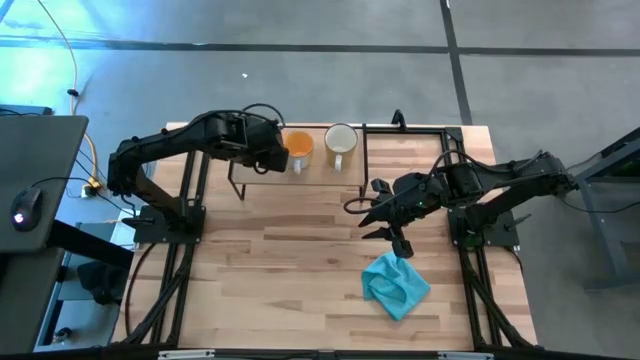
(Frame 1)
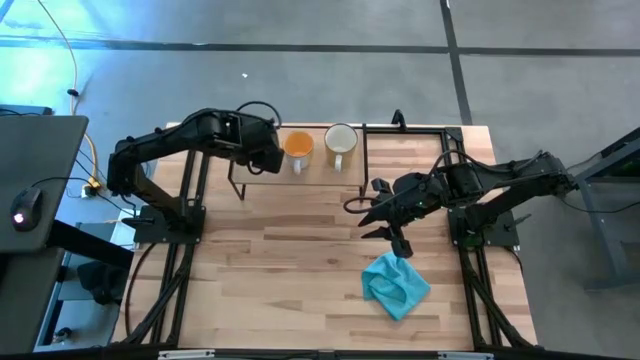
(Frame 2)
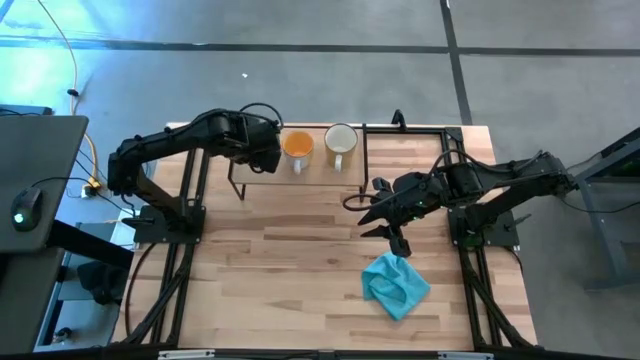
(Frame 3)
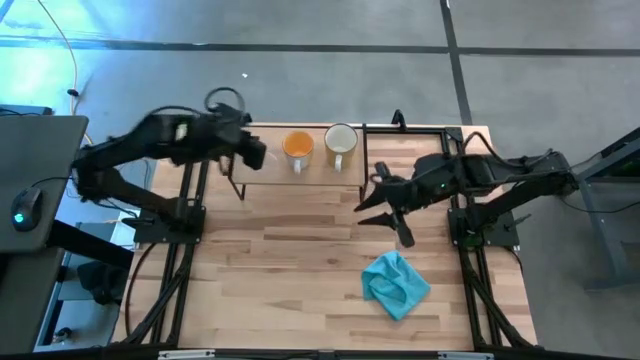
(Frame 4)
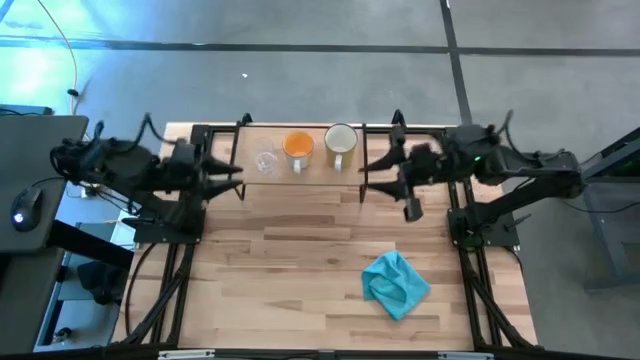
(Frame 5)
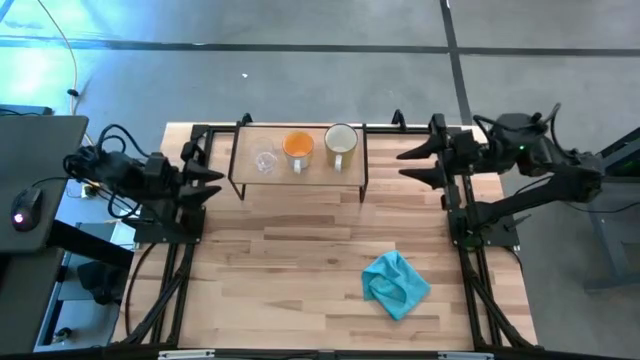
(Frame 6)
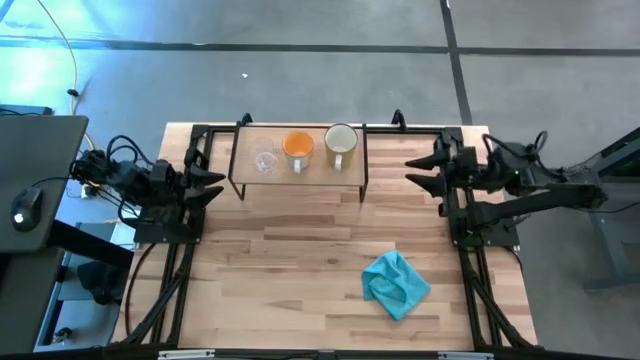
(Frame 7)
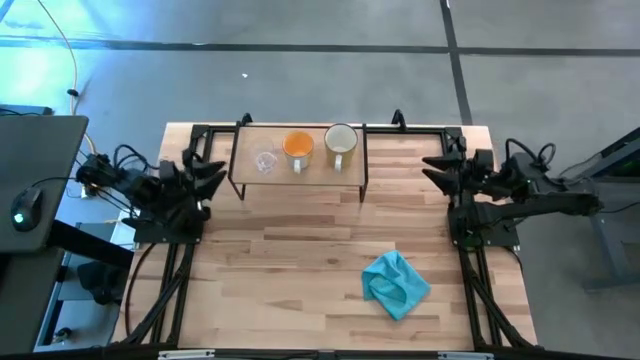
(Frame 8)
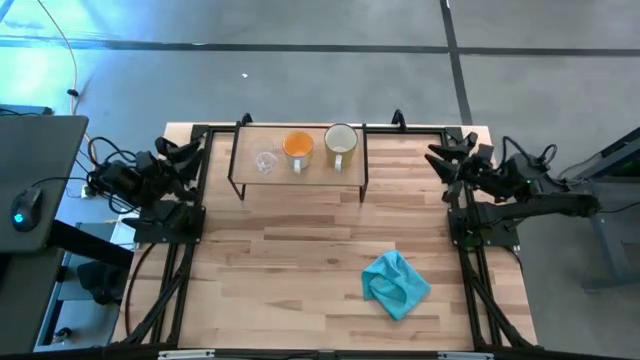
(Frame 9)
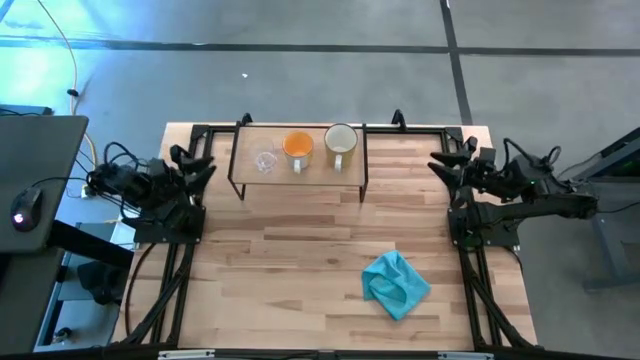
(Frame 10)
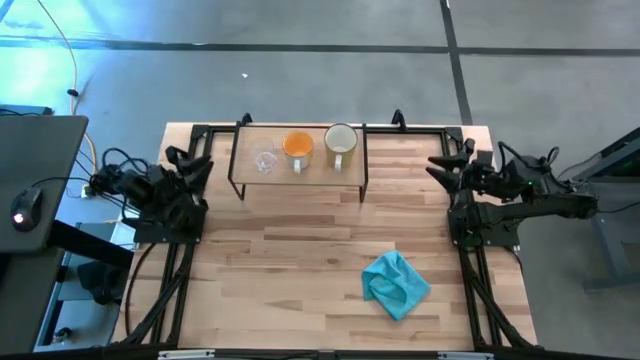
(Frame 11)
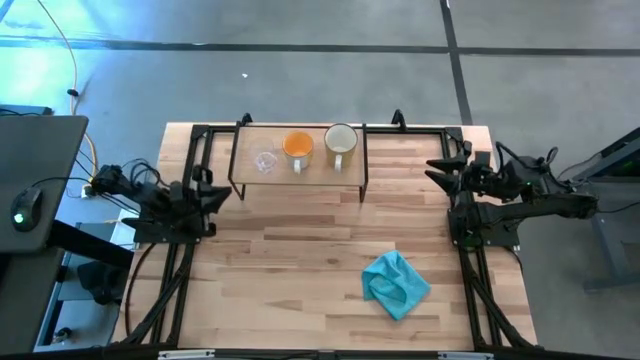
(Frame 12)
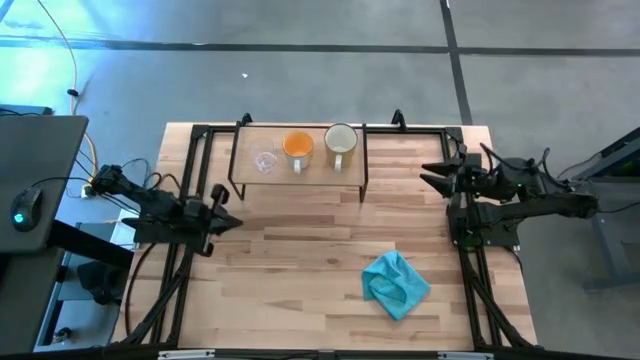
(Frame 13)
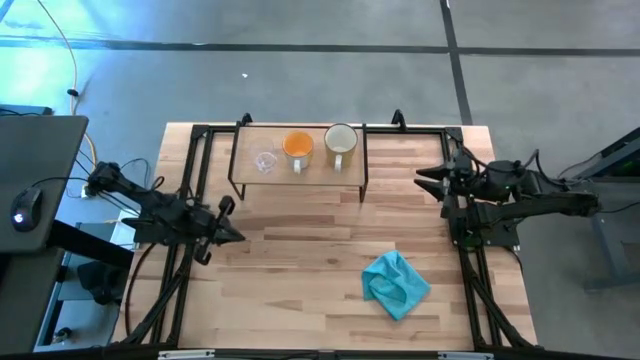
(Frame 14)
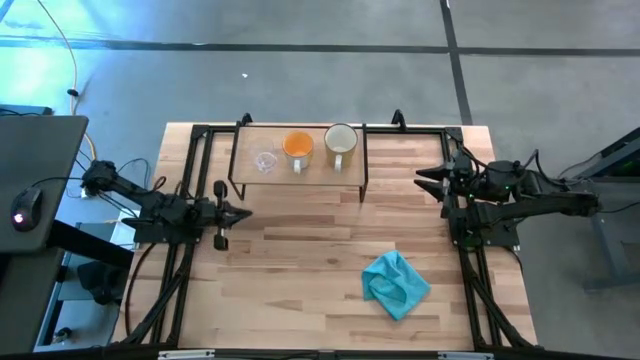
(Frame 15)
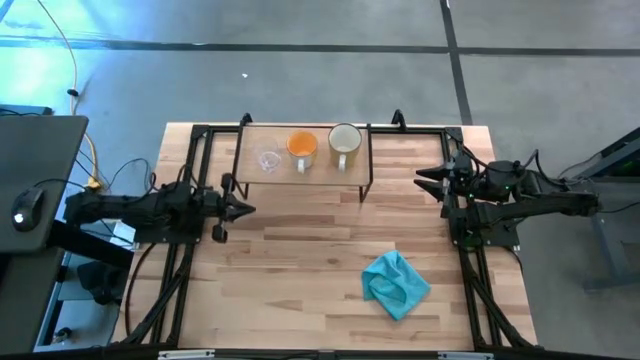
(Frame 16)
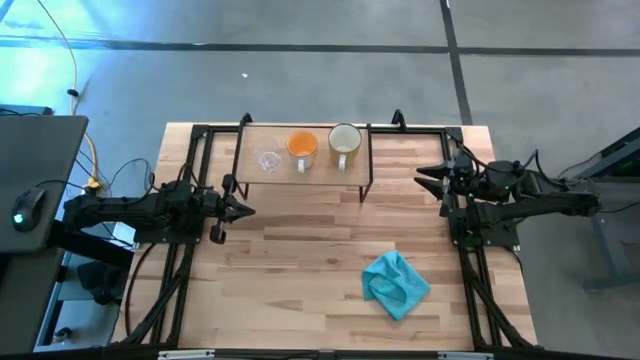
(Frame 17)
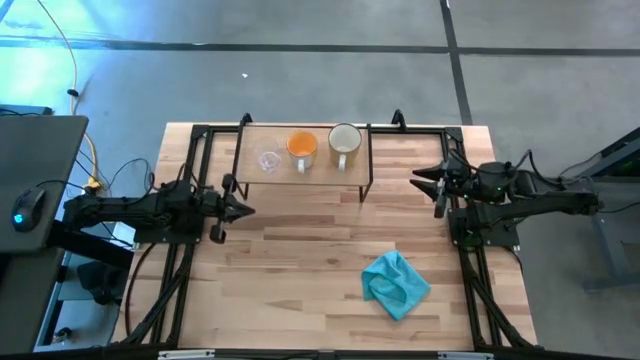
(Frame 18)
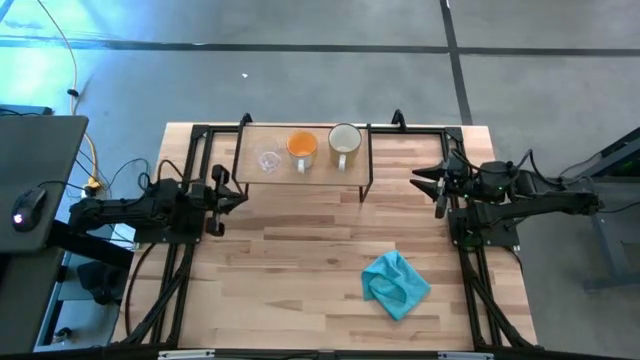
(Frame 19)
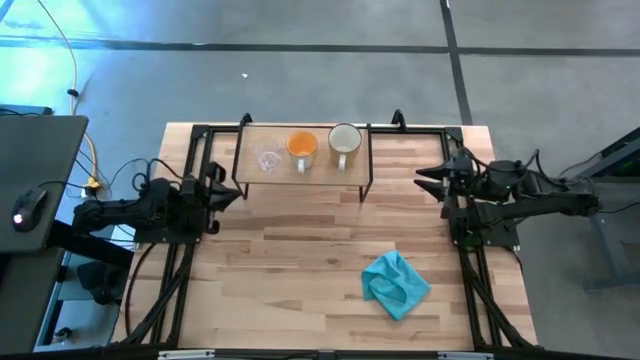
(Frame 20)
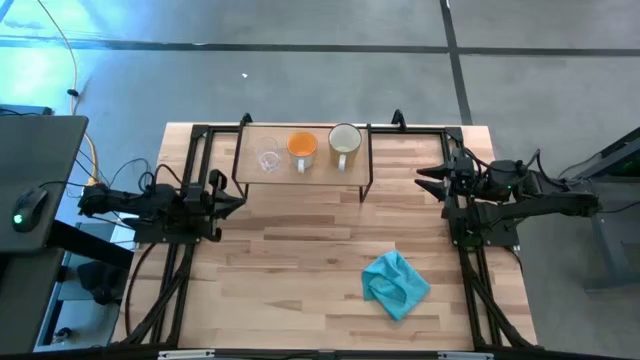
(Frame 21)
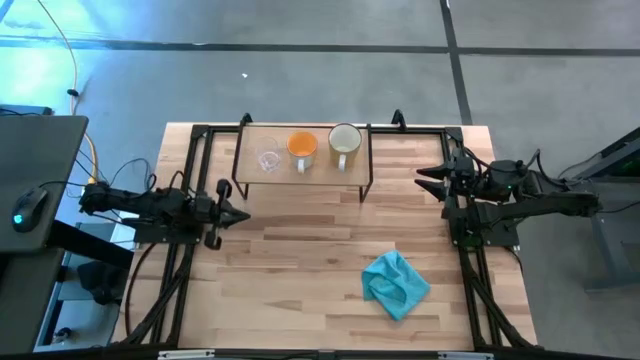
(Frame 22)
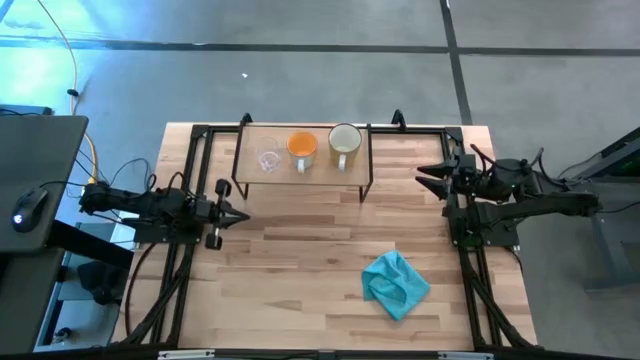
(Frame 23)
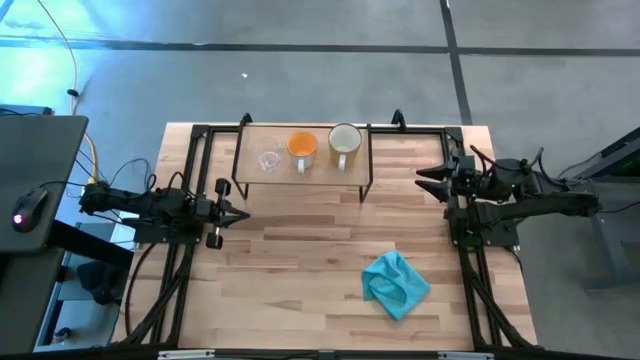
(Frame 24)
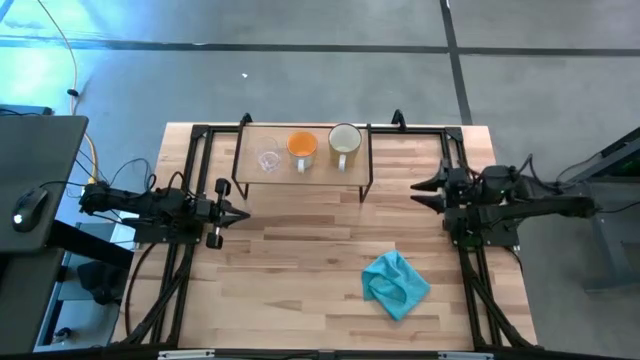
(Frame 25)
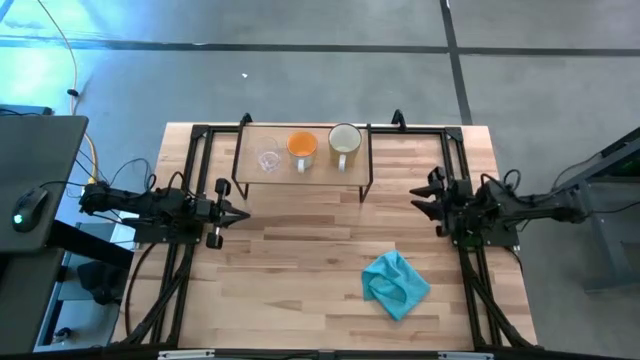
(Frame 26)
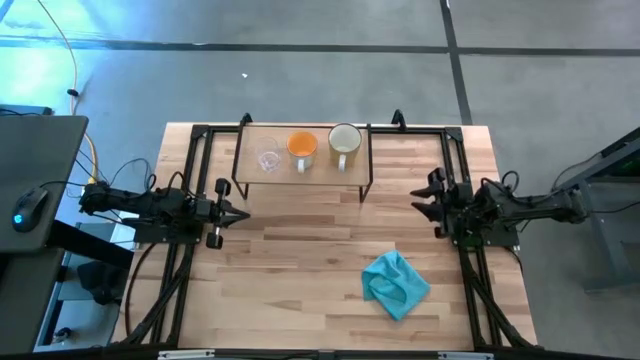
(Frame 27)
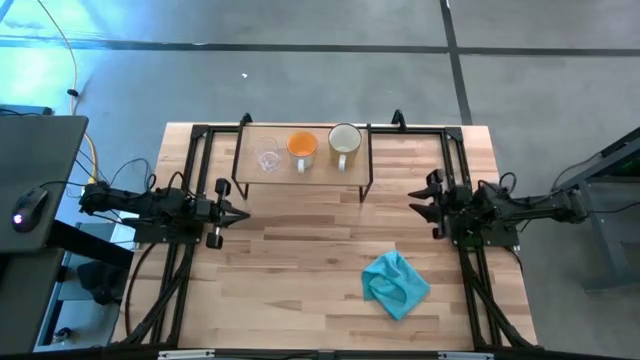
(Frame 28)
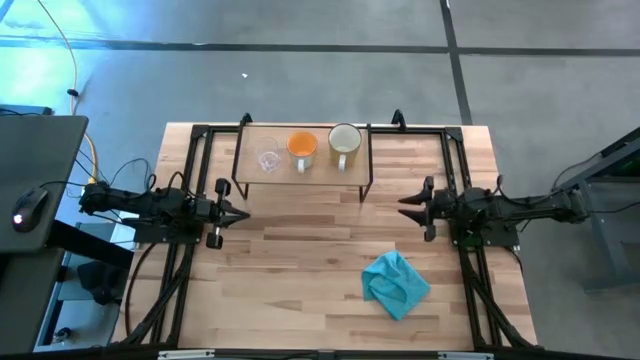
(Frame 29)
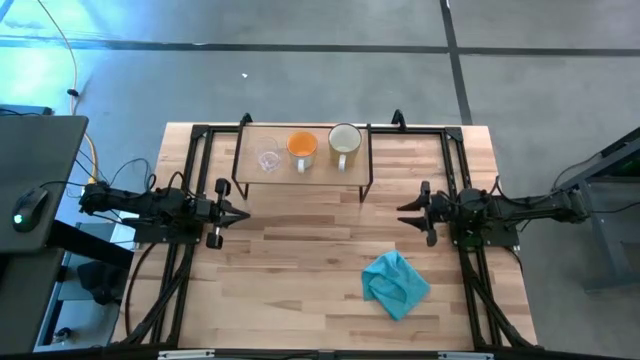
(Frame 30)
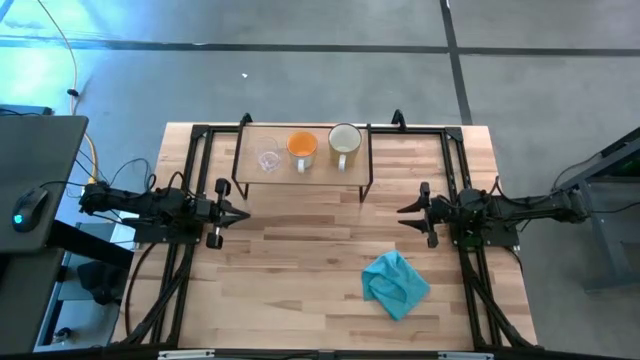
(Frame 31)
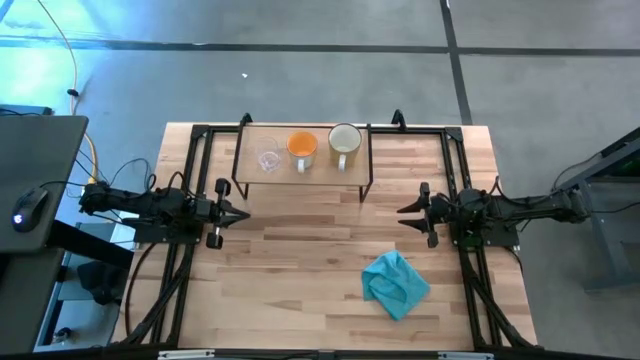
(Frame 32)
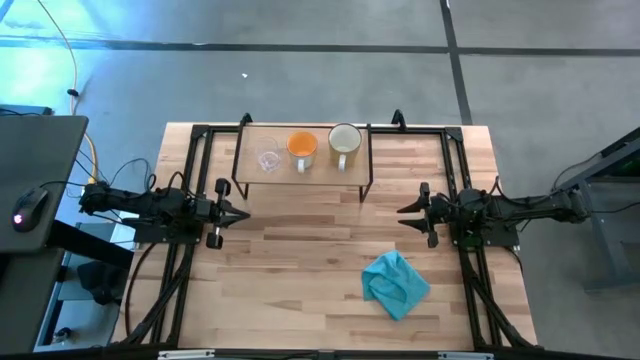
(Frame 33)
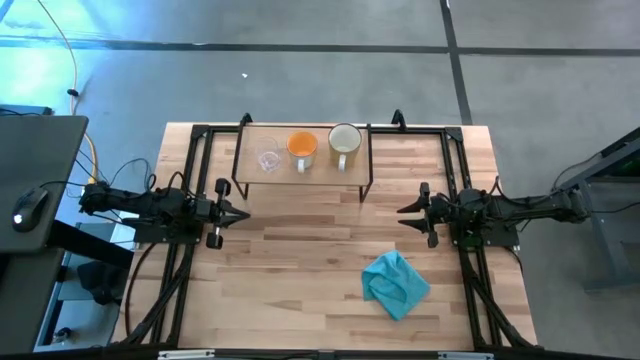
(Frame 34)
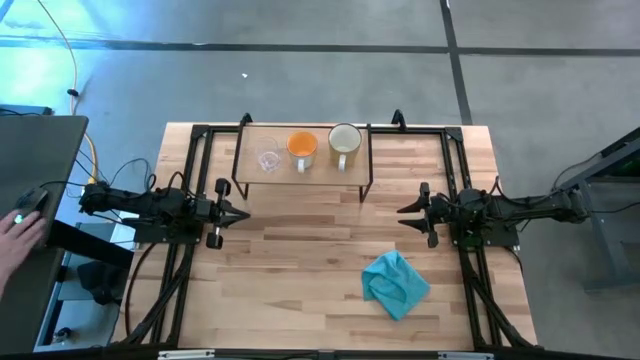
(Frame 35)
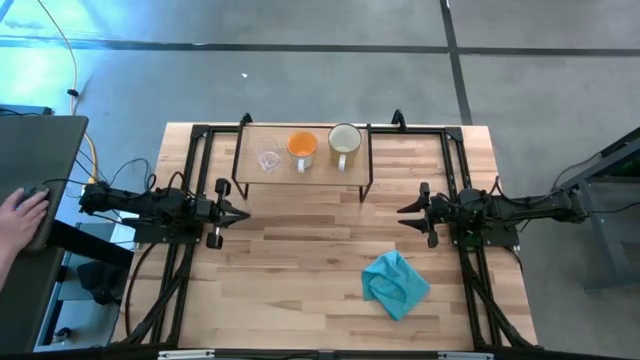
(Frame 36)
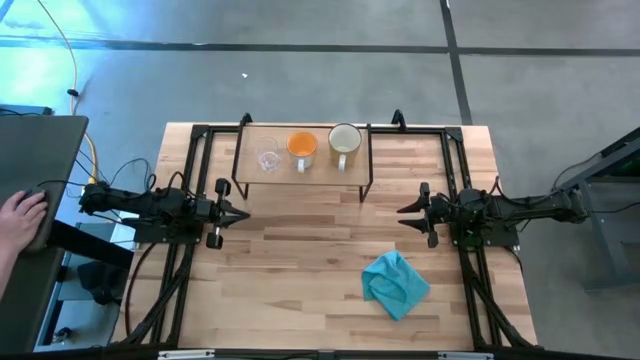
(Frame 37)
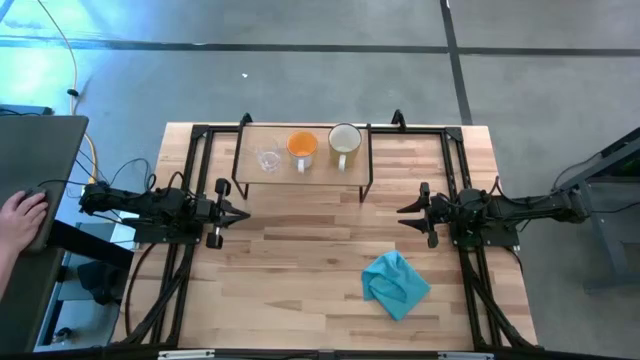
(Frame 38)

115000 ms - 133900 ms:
Task: Stack small to large cups/mugs on shelf
Return to Home Position

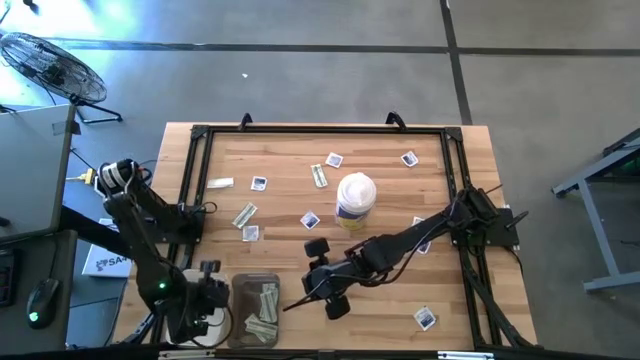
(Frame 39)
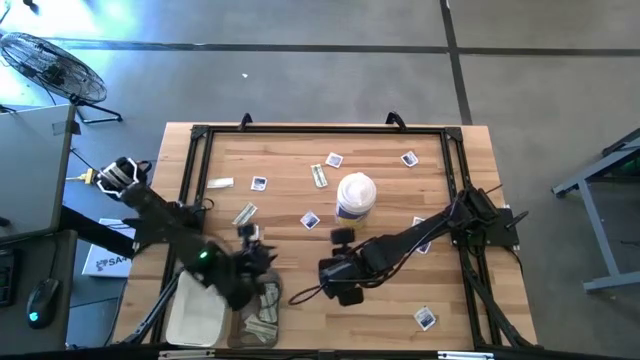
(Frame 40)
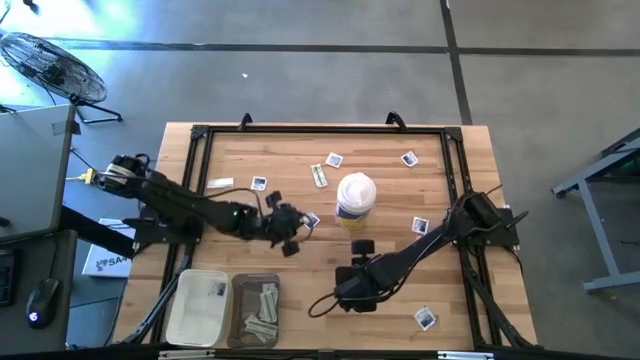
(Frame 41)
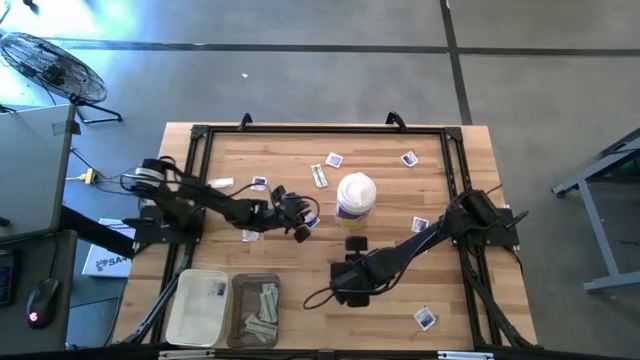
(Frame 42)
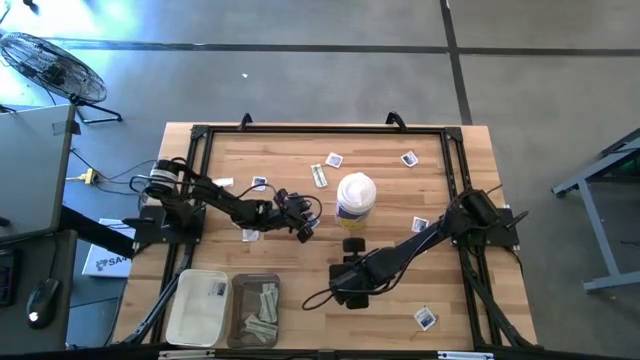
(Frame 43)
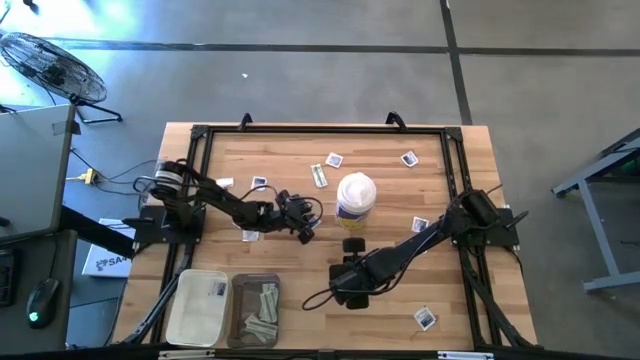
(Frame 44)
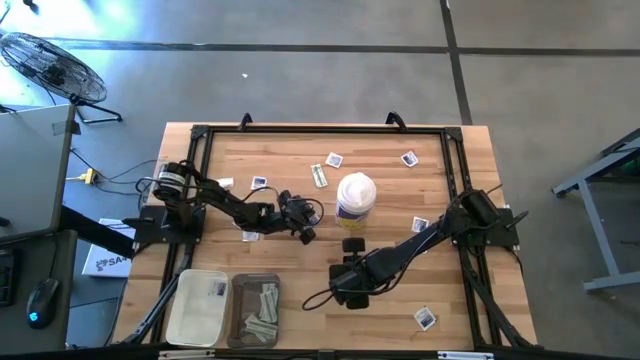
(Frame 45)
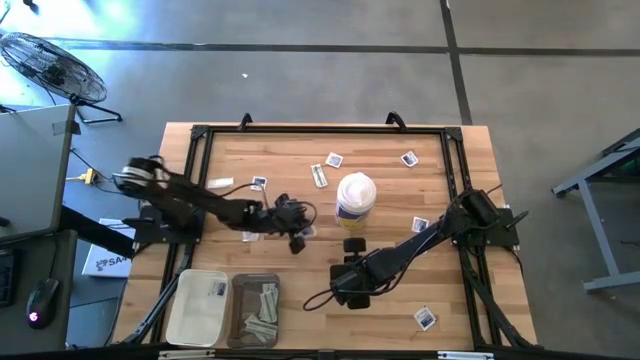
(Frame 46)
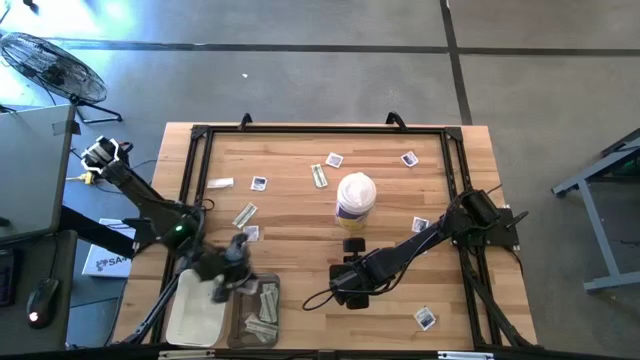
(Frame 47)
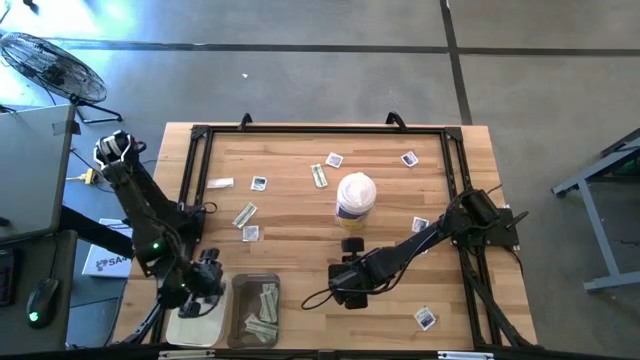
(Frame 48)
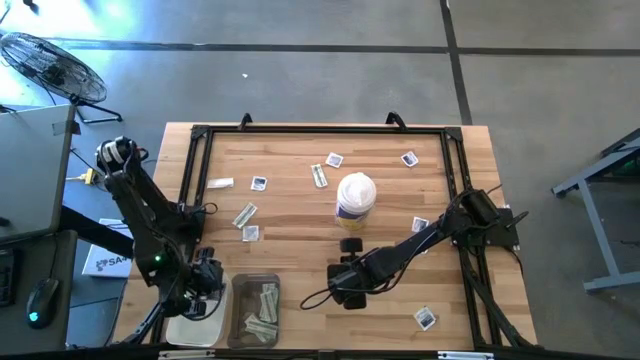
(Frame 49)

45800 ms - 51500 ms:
Task: Pick & Place First Aid Supplies
Put the alcohol pad into the white bin
